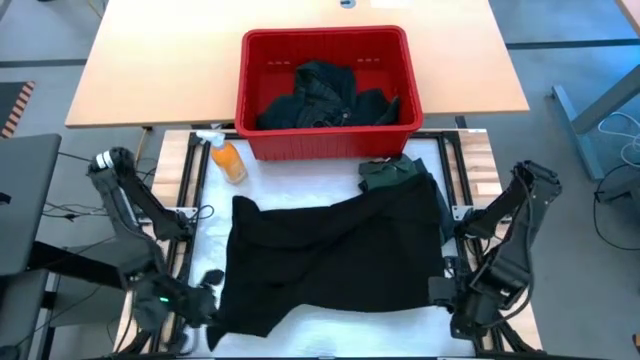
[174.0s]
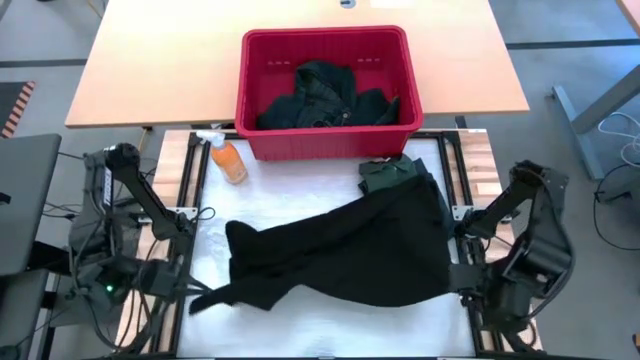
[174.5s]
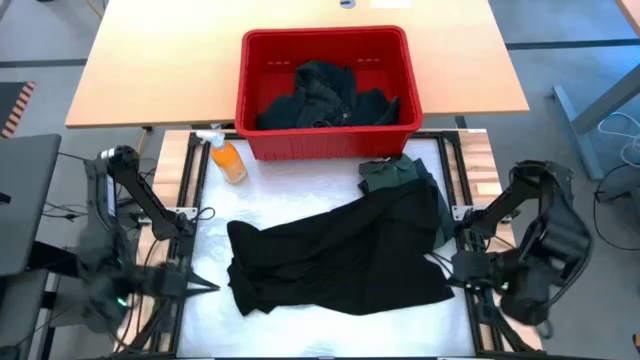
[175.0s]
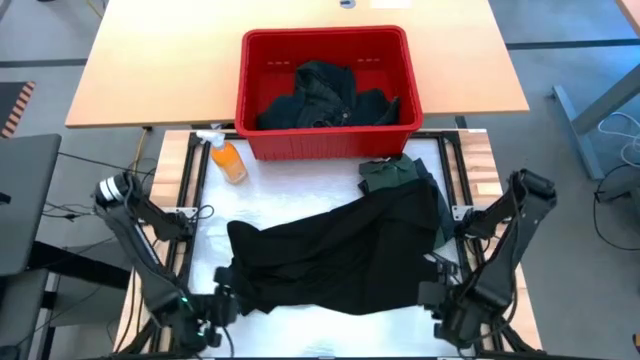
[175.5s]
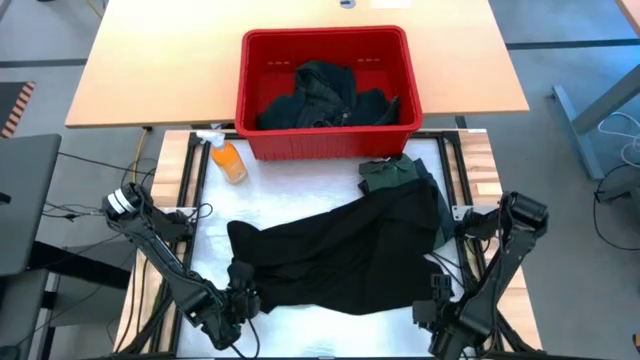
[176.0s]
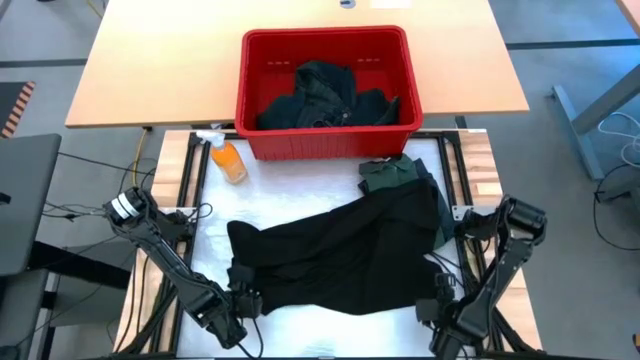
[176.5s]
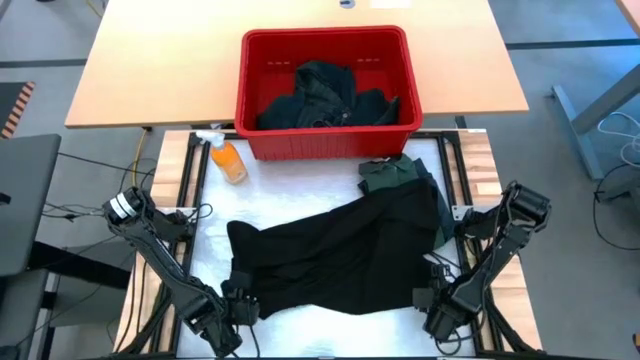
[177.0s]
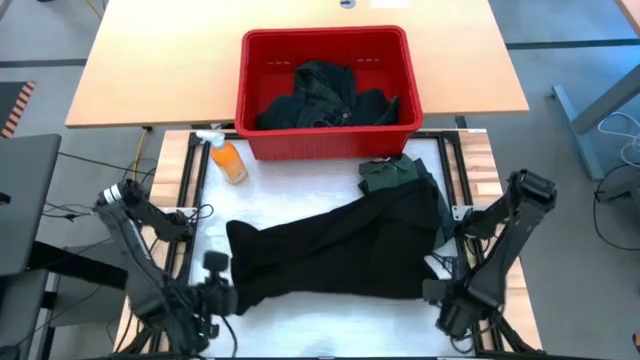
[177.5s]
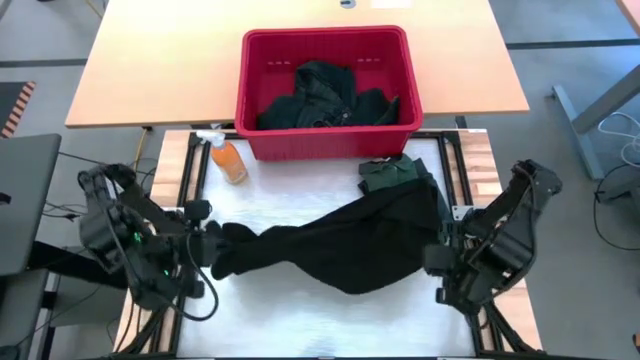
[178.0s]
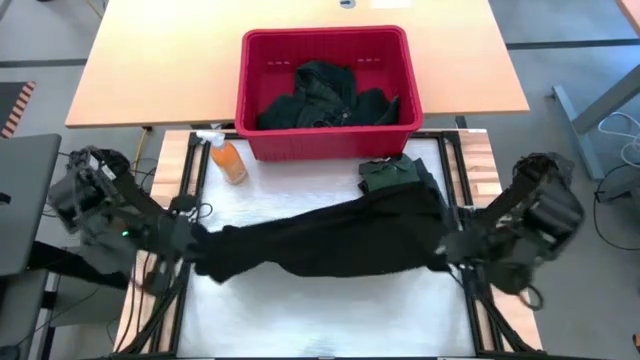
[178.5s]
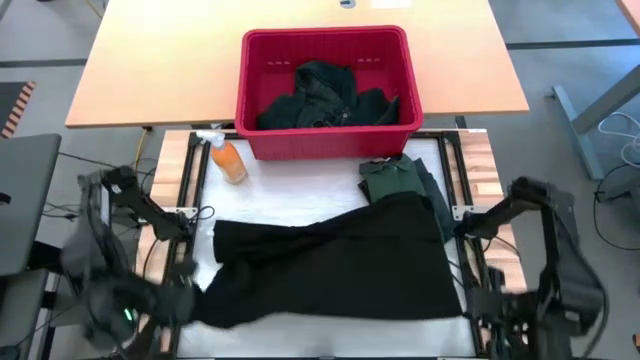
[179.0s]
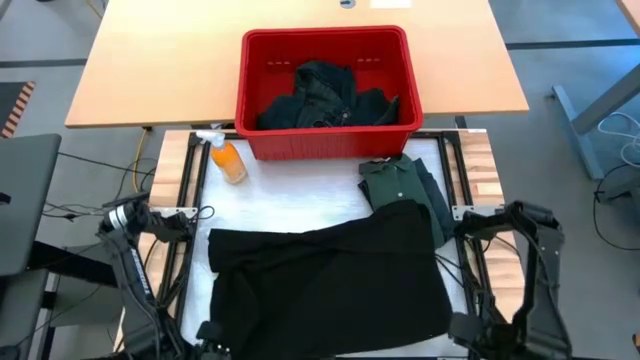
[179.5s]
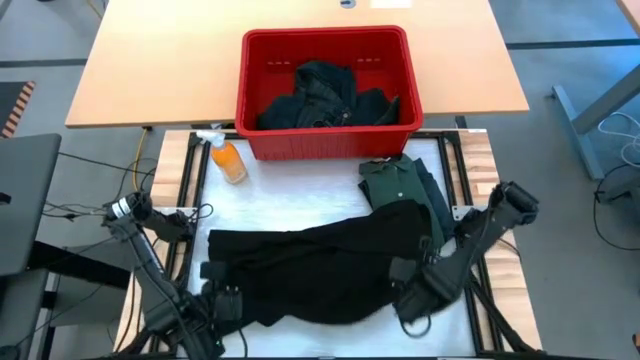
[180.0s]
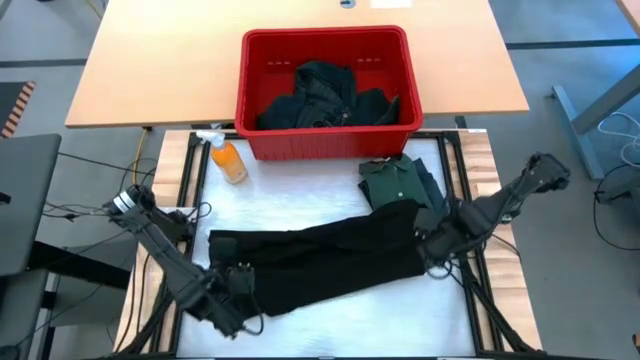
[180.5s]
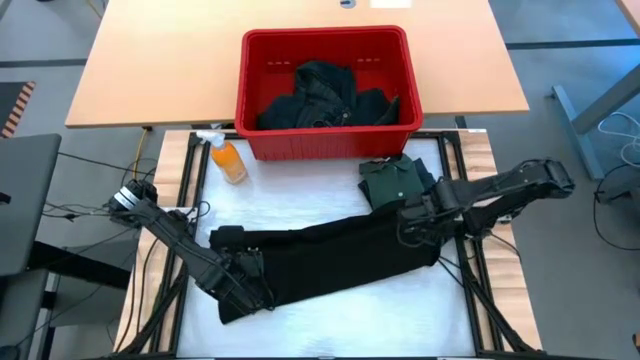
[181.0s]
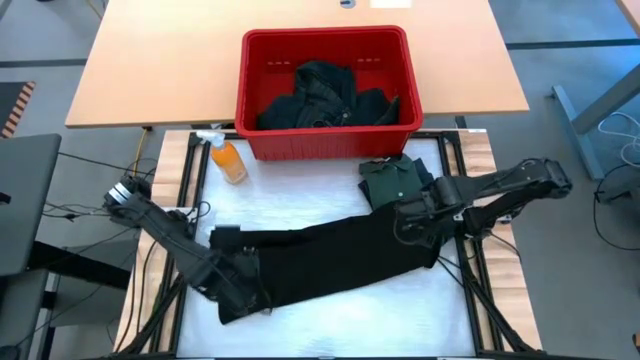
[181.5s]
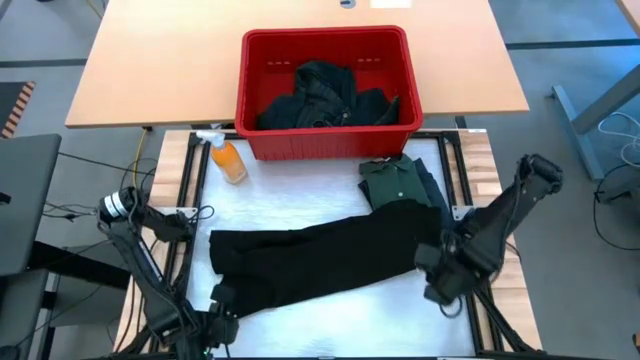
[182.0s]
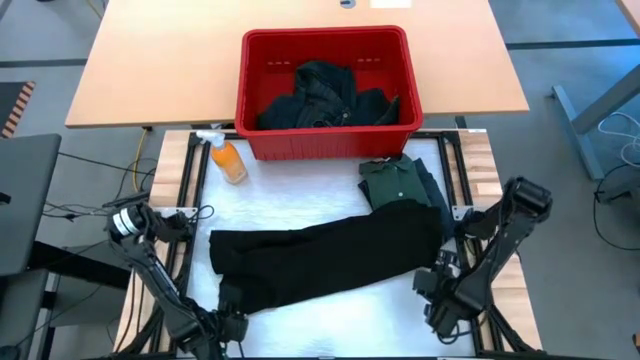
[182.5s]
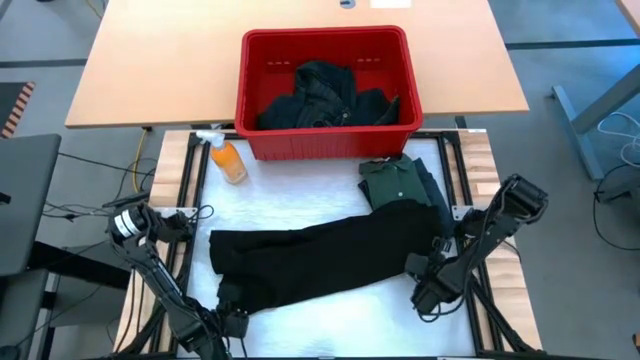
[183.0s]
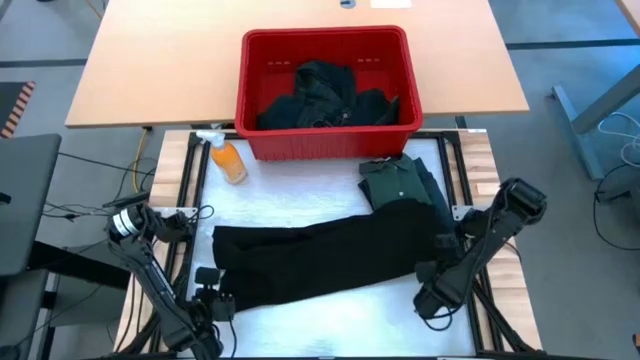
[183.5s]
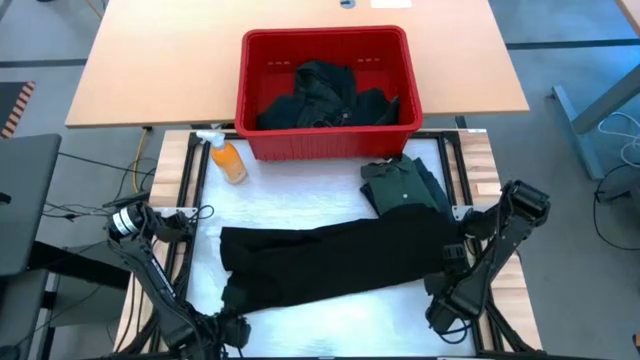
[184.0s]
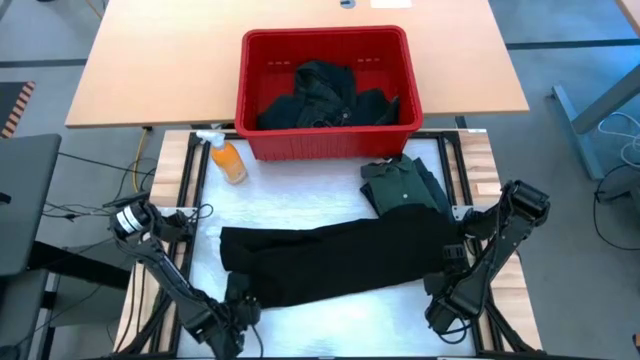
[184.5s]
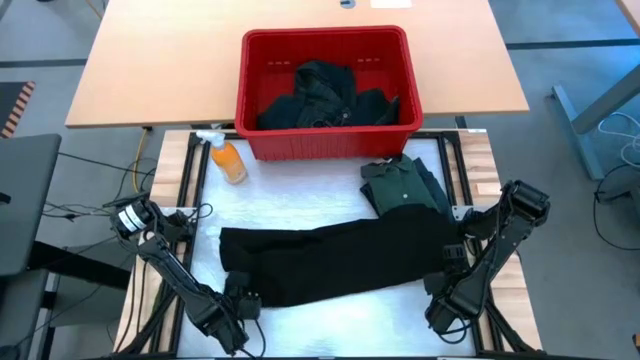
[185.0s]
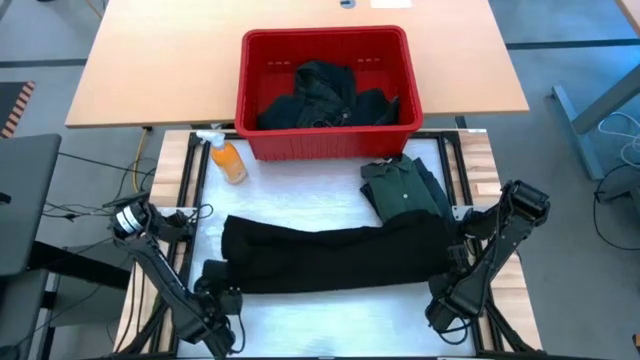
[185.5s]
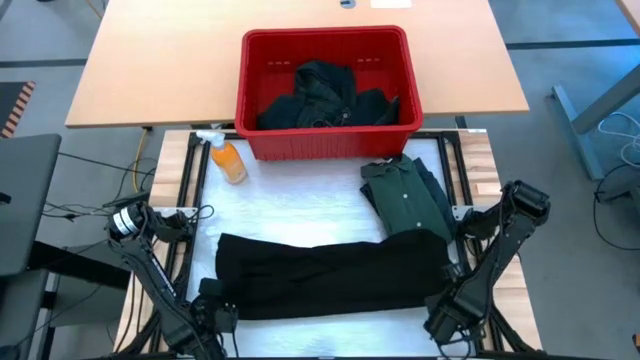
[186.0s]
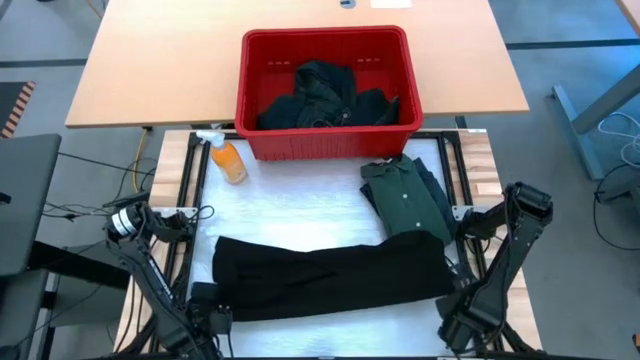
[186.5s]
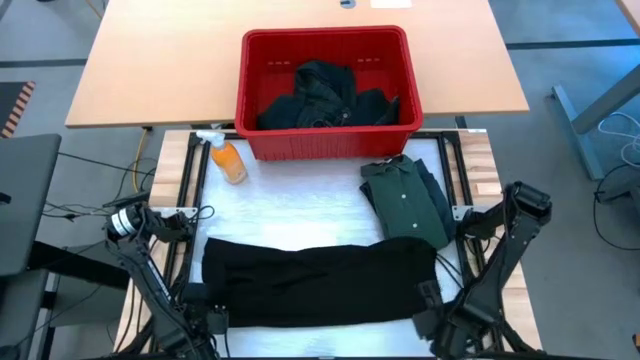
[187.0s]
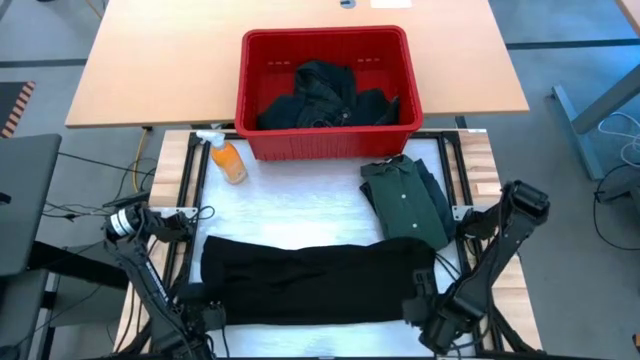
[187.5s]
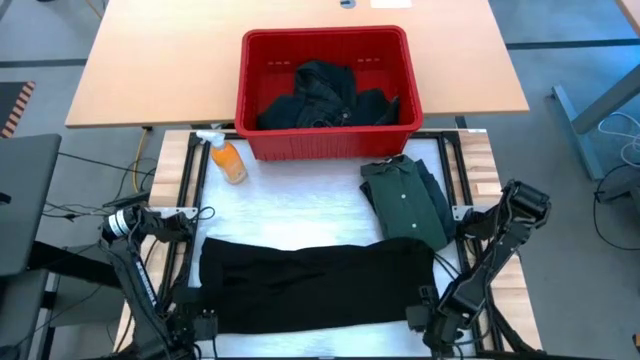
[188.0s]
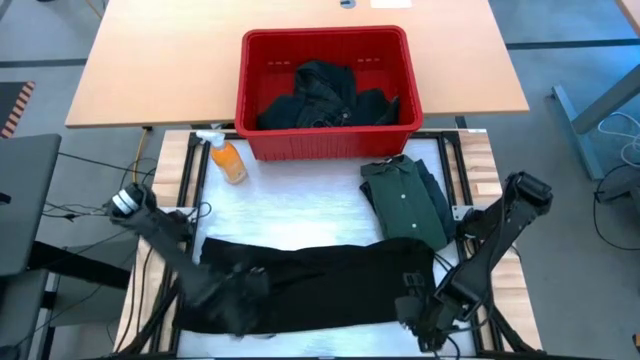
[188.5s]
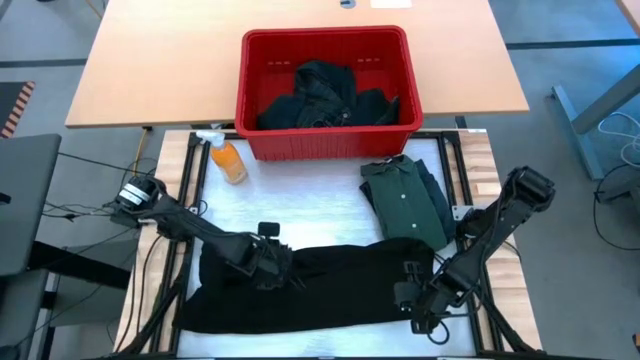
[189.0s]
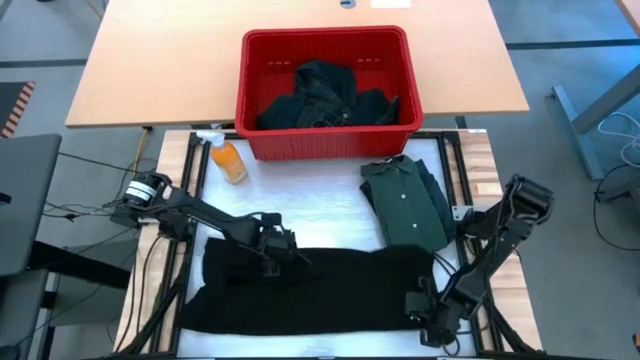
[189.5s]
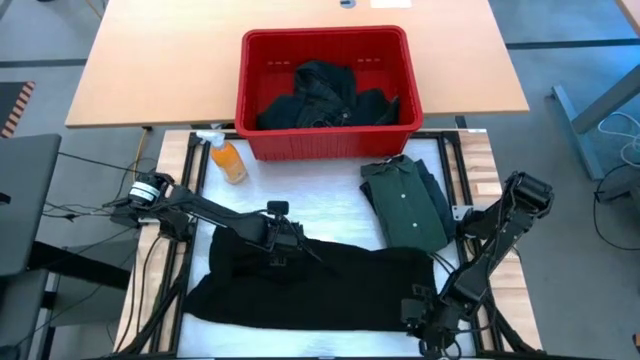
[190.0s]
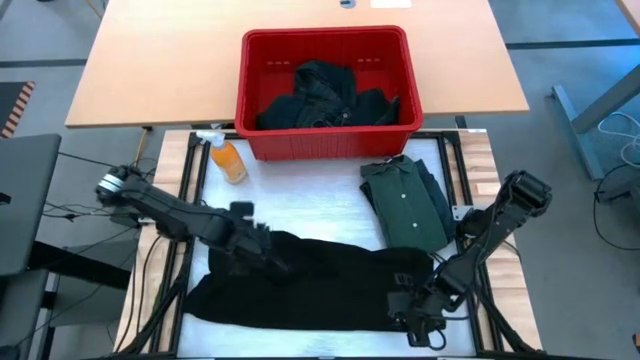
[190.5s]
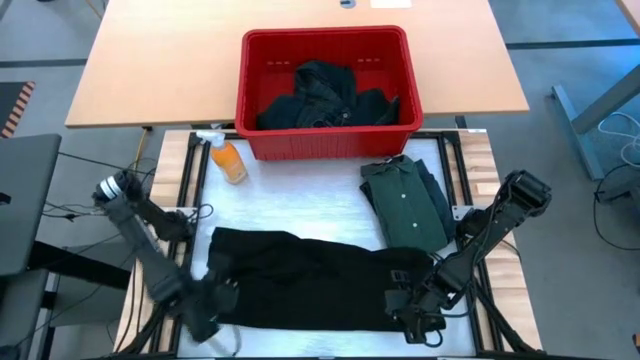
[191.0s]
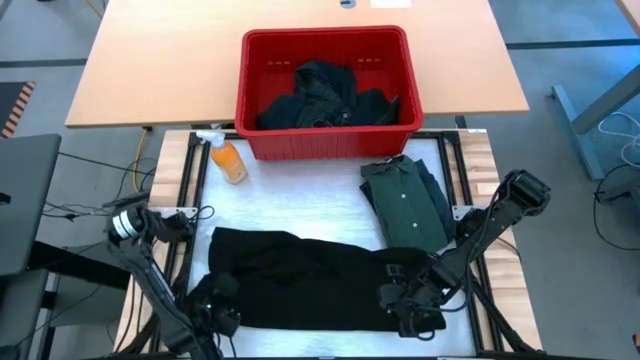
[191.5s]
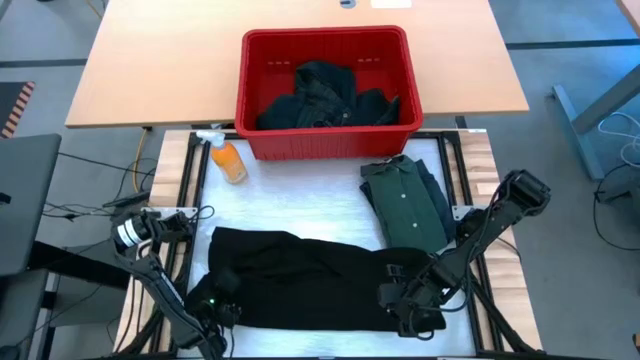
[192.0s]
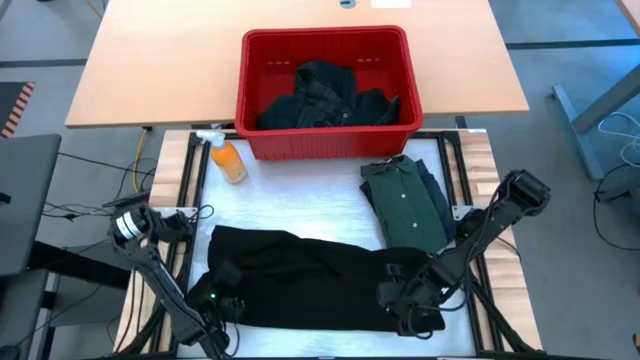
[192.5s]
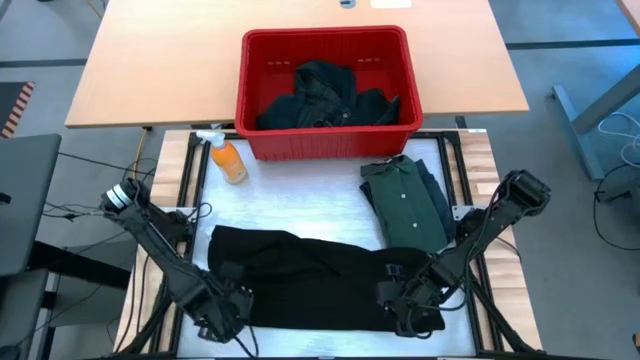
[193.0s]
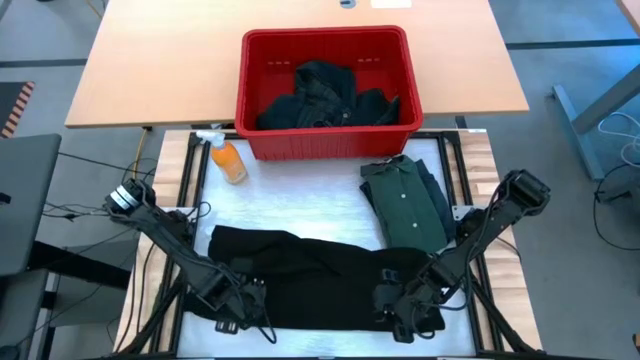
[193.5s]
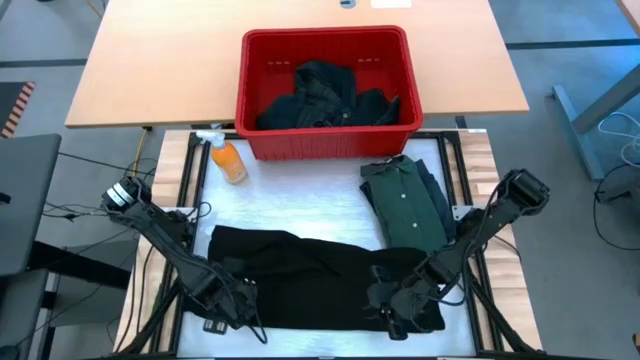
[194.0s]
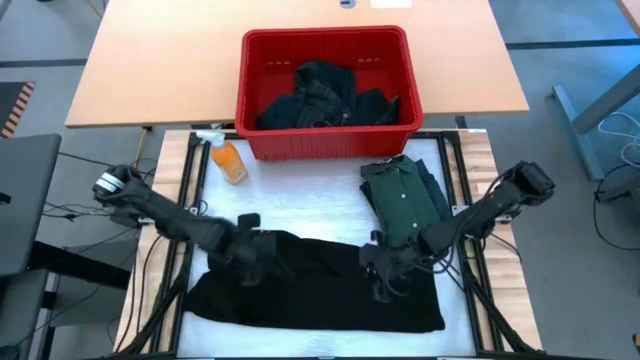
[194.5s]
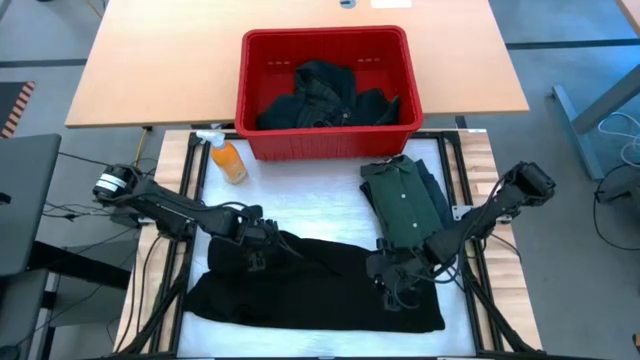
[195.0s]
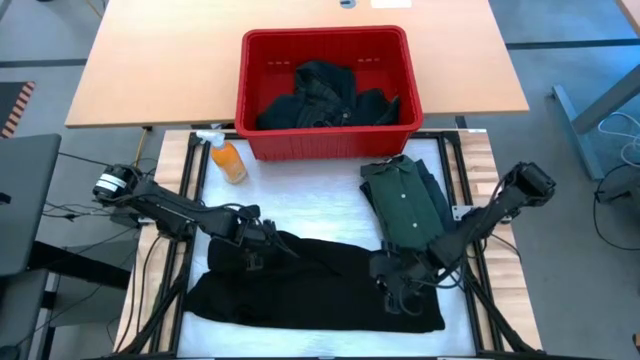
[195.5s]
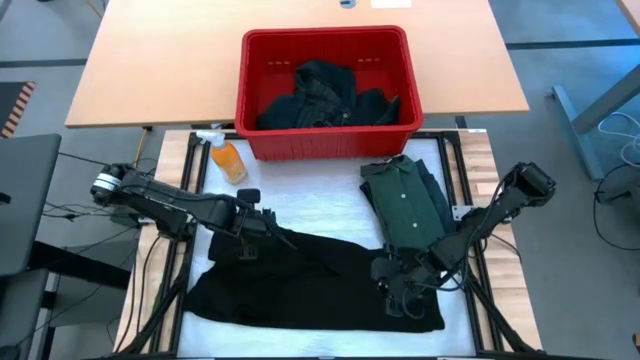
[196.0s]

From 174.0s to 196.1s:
Task: Fold laundry
Fold the black shirt
